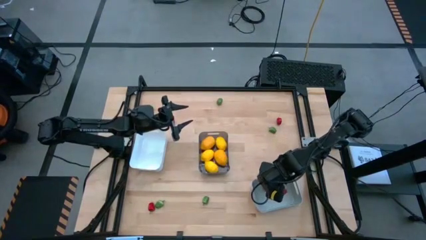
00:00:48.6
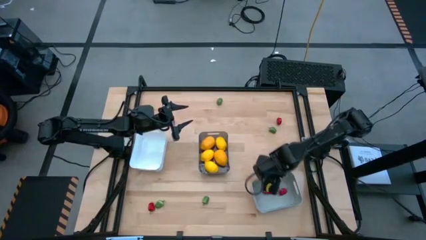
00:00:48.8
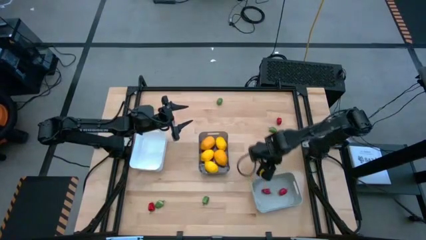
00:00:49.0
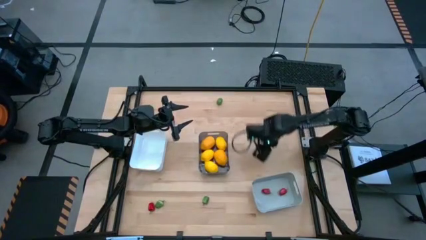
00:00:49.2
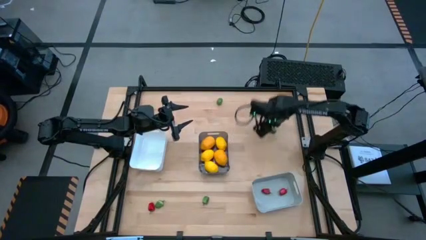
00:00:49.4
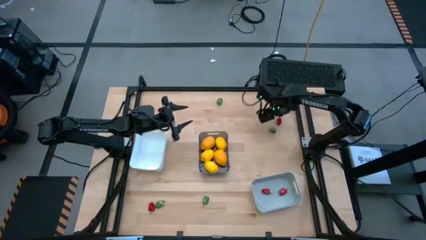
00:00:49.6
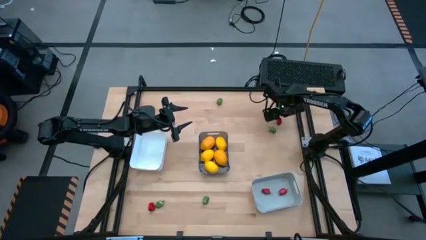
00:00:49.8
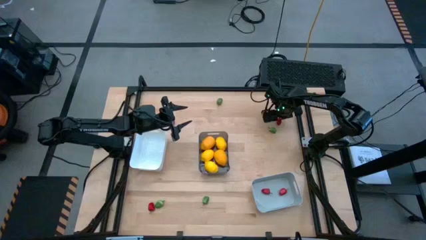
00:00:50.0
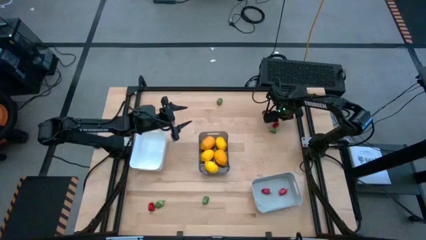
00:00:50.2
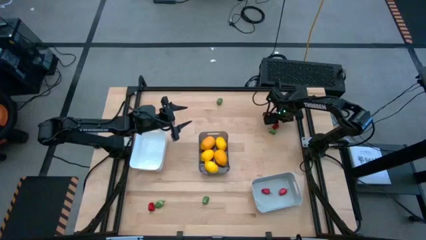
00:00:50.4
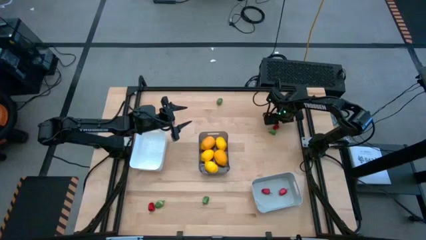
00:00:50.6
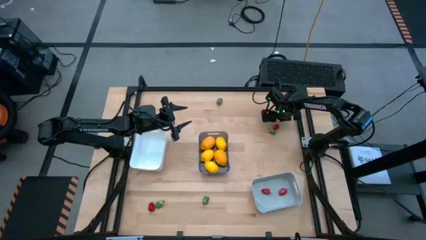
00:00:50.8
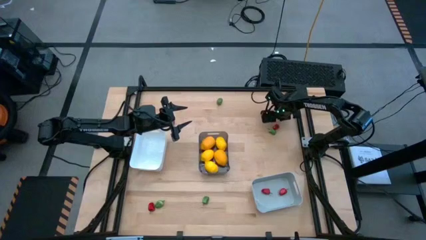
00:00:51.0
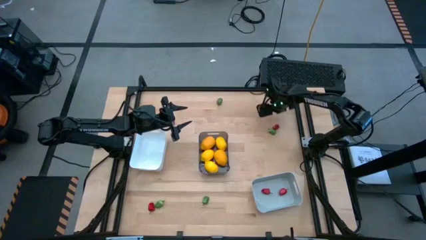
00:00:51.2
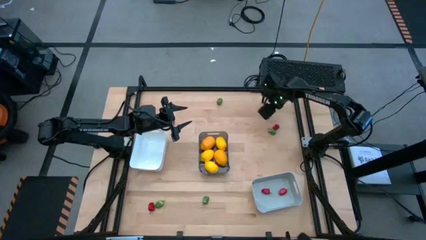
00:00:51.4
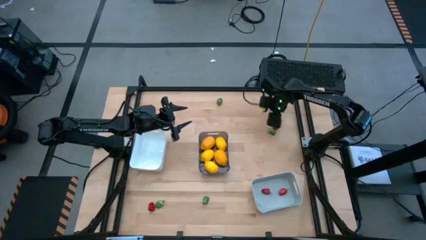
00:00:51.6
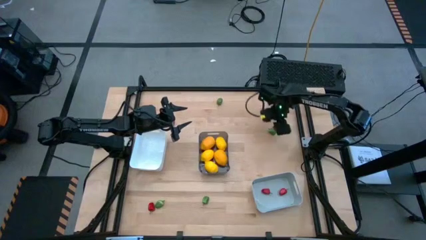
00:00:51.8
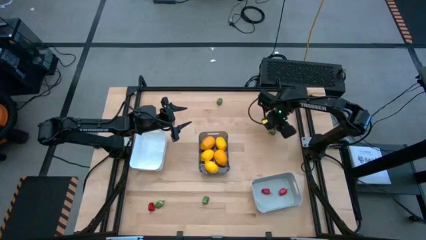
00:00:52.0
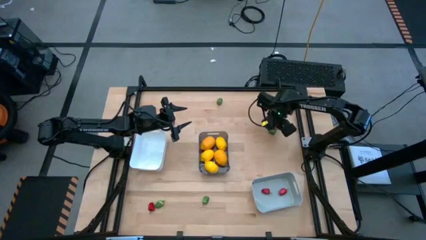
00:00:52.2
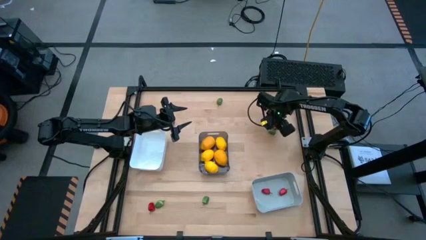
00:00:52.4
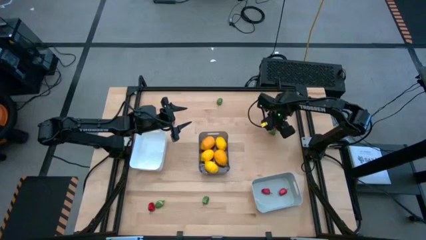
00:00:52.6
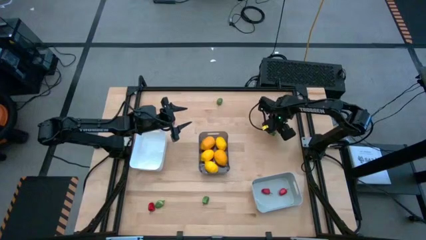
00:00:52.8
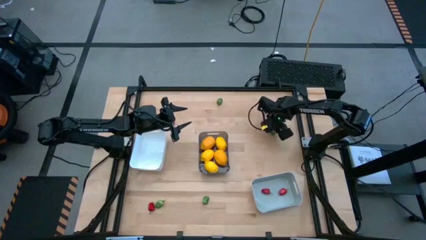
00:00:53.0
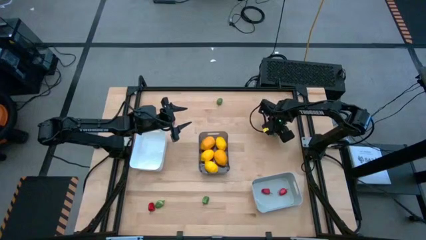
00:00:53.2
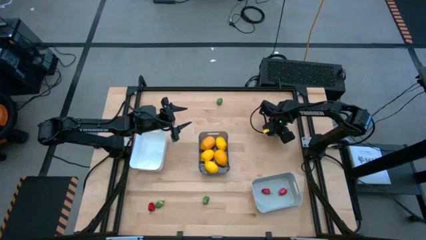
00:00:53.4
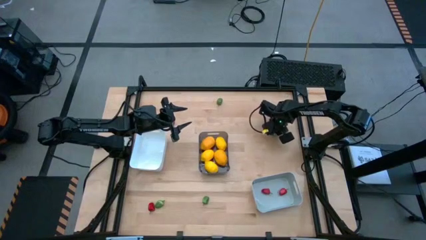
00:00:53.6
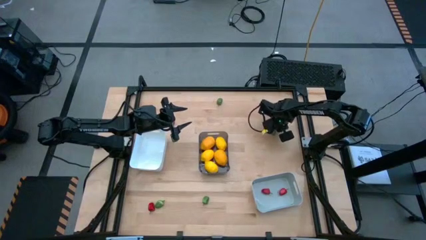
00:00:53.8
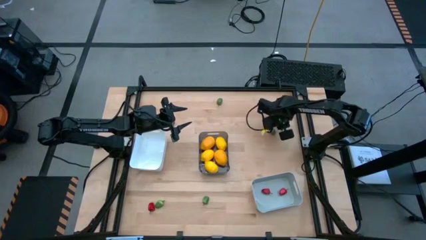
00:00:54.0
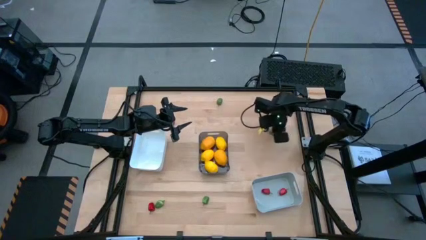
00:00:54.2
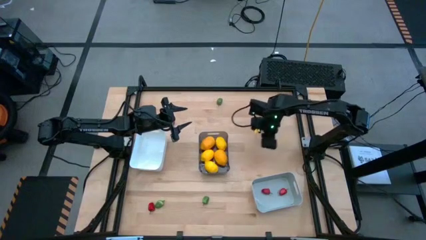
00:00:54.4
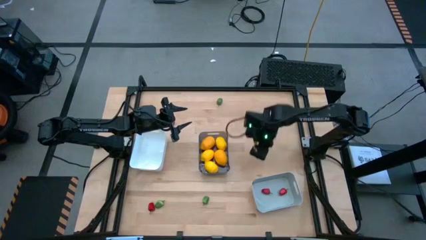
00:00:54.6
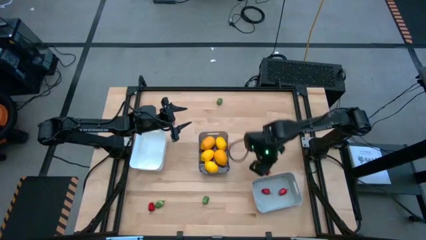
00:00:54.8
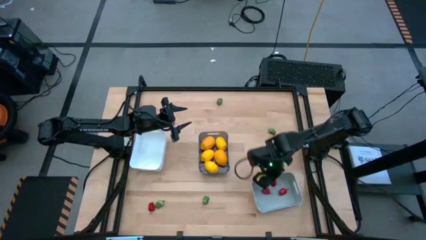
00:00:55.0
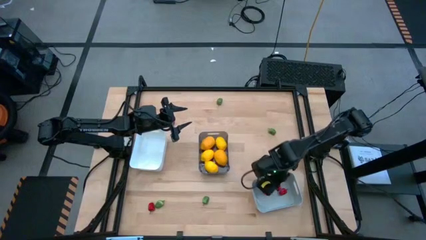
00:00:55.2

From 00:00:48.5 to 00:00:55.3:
Task: Sort produce into baskets
Put the red chili pepper into the gray bin

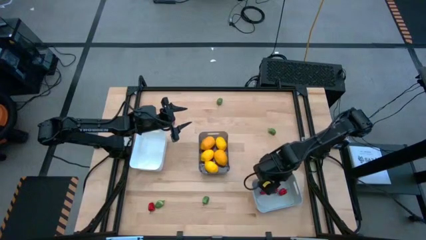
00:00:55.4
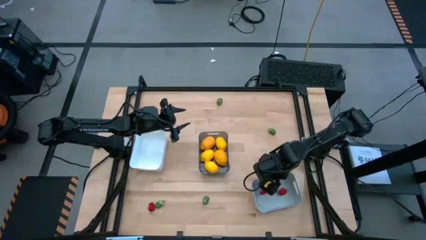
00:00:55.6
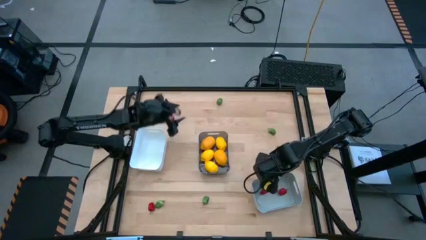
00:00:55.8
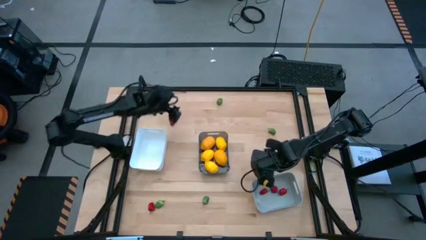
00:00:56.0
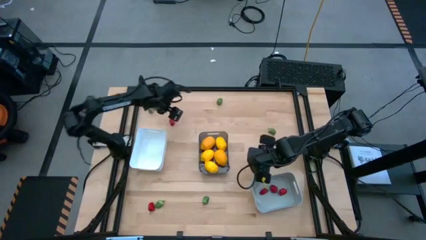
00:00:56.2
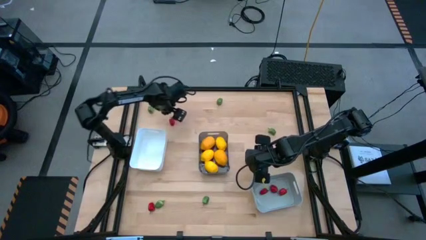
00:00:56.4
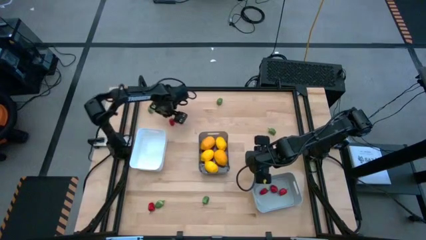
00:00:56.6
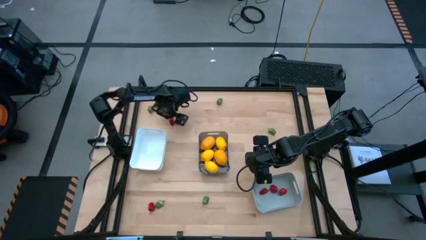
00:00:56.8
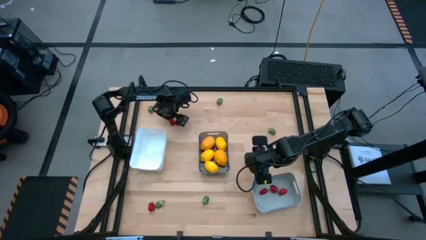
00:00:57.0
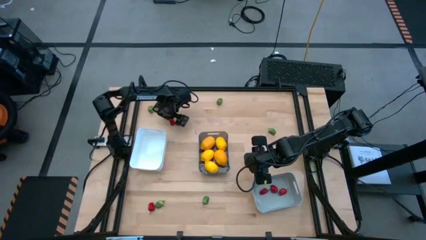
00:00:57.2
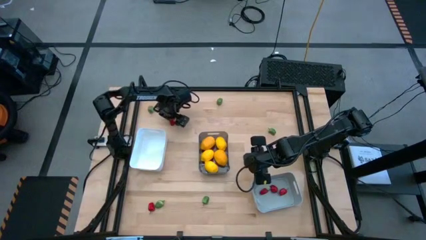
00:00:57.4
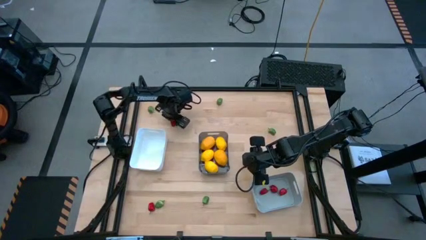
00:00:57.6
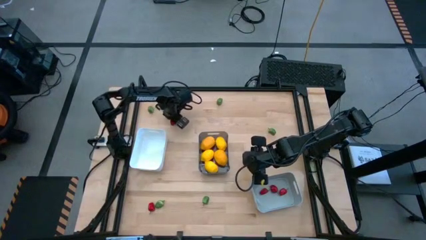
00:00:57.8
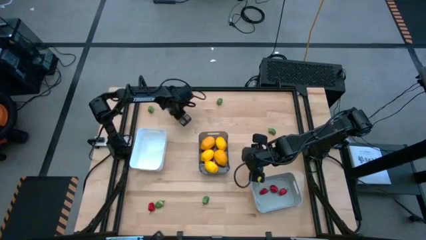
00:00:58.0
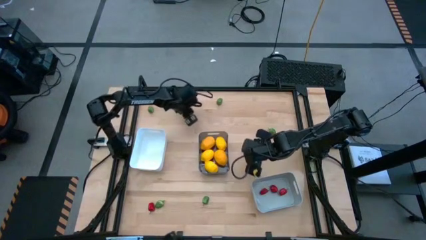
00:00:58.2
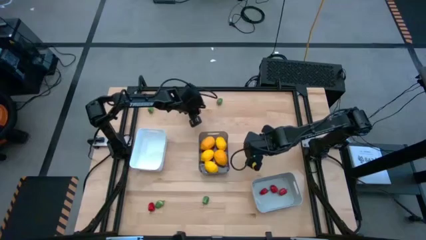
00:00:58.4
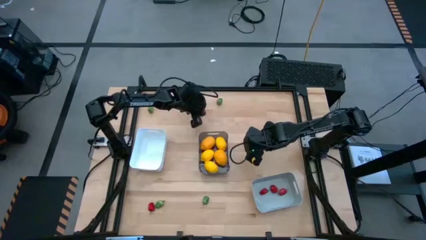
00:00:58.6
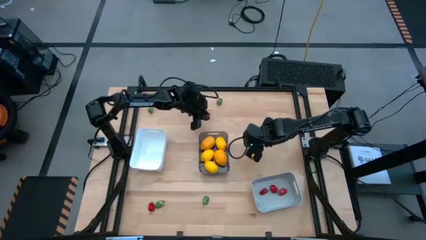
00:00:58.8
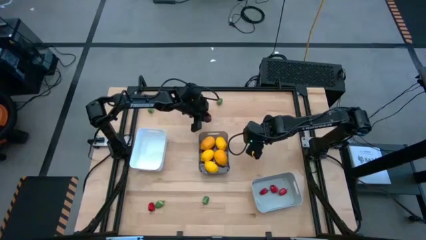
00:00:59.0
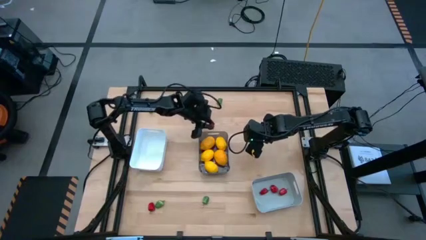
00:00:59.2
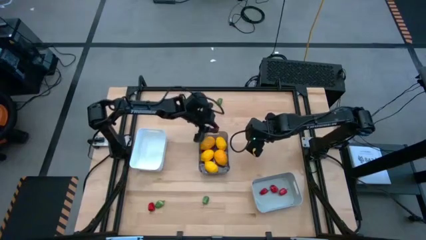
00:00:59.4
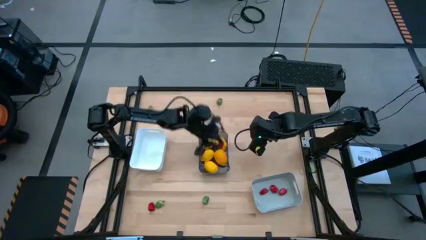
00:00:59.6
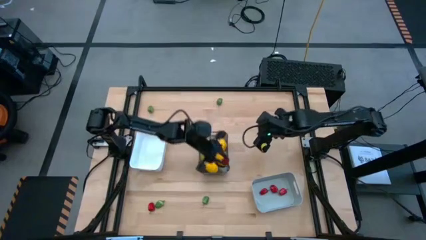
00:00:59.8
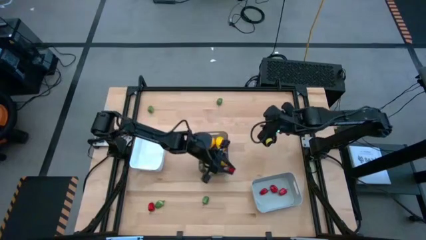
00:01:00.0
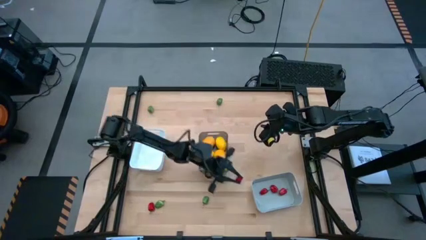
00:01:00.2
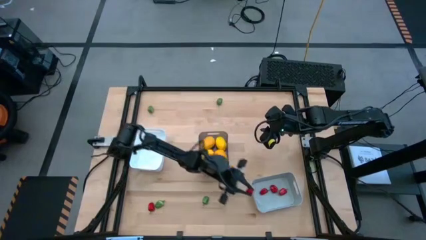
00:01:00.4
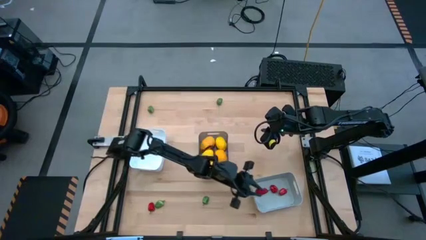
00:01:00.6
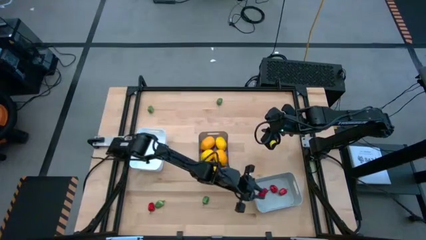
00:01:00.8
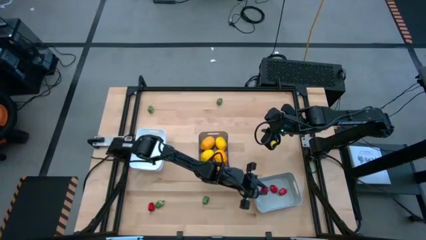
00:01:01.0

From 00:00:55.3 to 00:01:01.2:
Put the red chili pepper into the gray bin

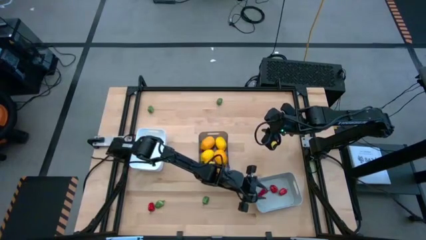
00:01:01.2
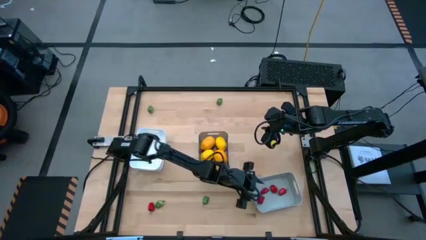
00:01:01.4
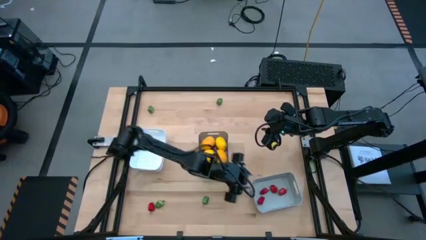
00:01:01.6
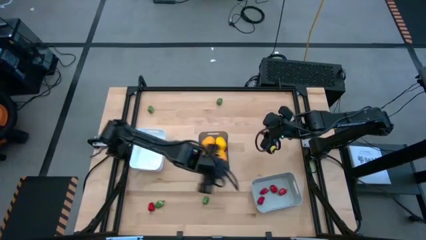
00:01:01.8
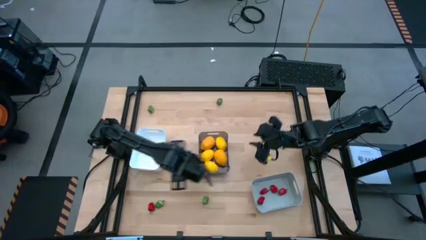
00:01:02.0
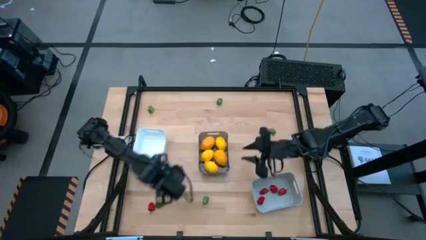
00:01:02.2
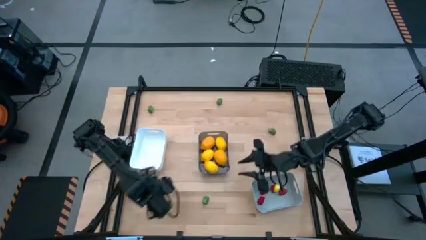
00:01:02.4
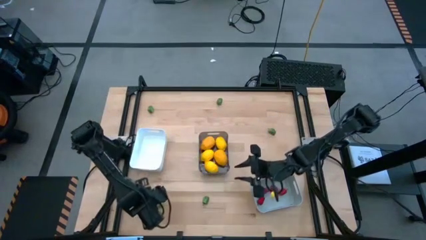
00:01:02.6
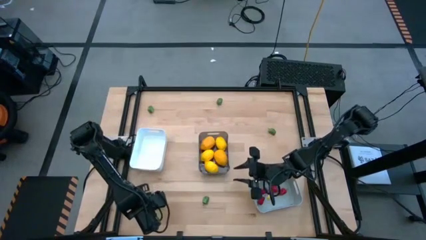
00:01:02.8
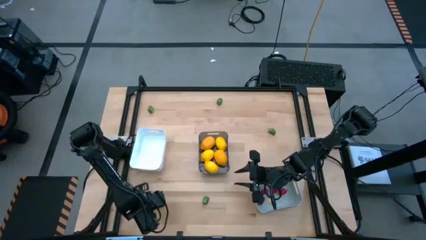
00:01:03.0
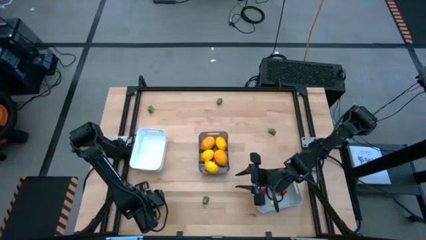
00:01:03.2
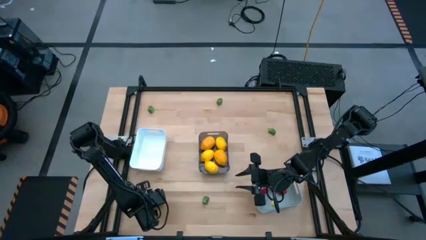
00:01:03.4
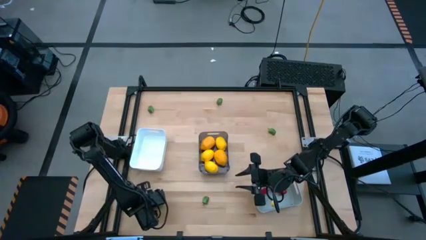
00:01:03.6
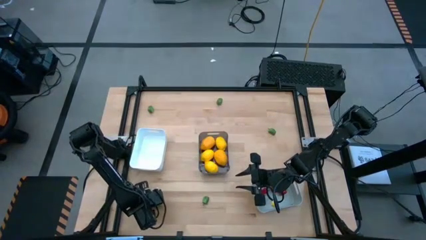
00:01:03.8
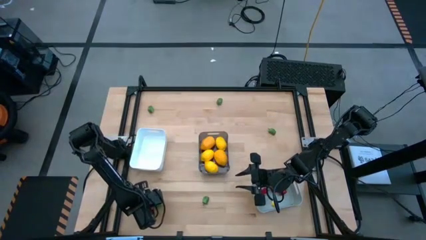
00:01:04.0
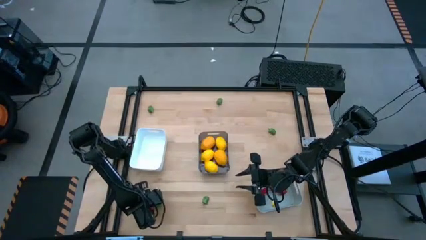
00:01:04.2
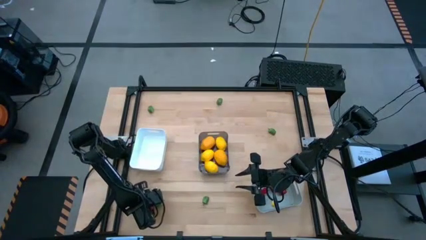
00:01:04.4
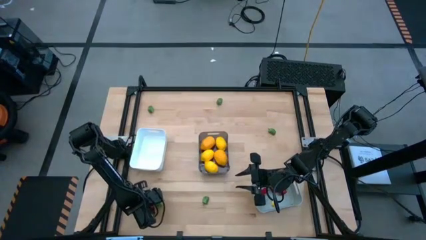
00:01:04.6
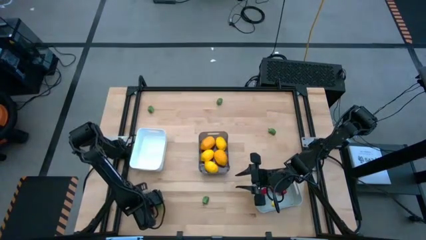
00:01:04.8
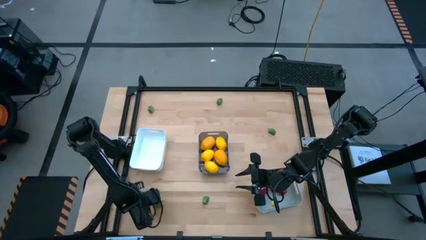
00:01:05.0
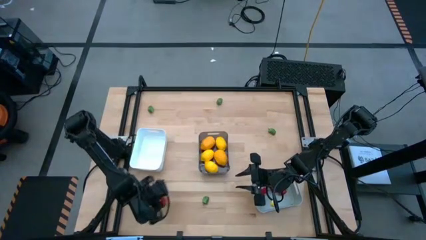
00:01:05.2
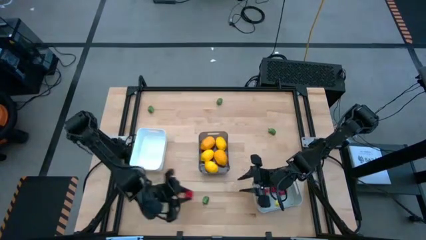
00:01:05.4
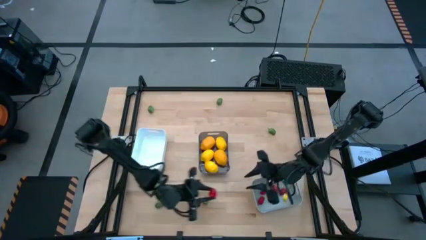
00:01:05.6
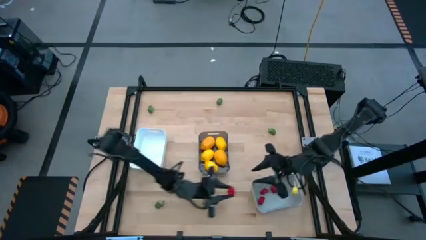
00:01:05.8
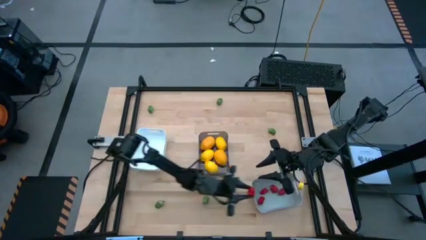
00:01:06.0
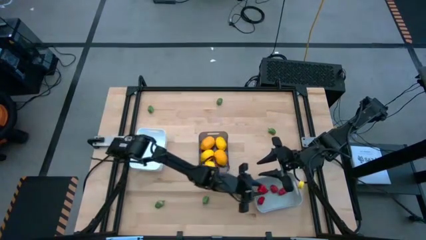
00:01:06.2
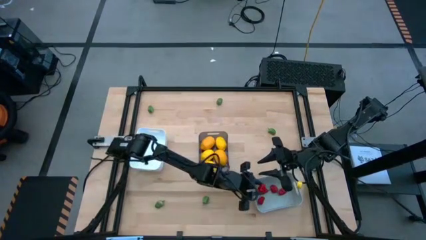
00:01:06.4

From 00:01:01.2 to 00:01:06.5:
Put the red chili pepper into the gray bin
